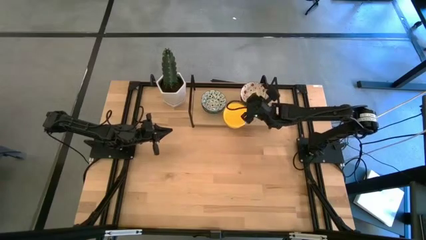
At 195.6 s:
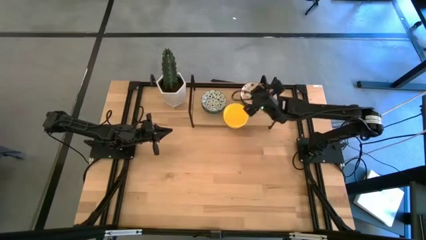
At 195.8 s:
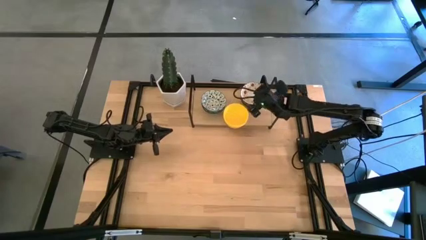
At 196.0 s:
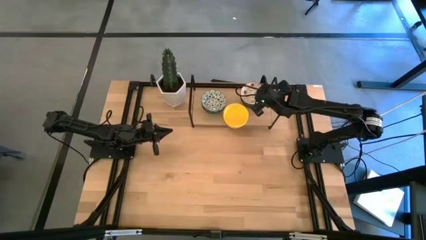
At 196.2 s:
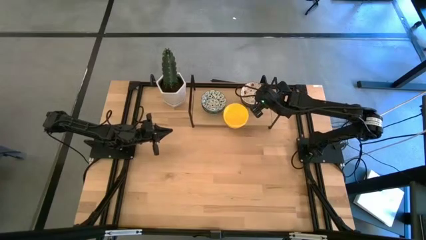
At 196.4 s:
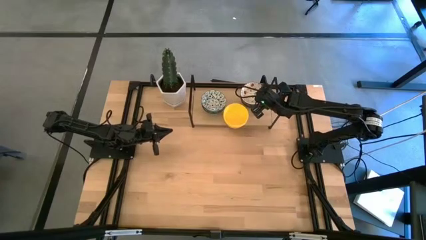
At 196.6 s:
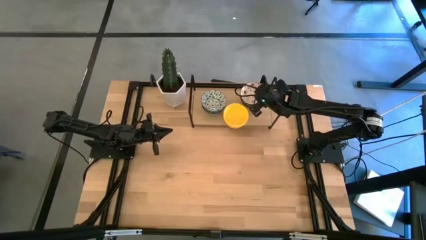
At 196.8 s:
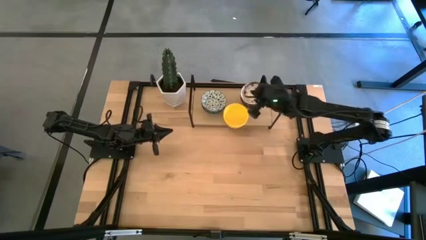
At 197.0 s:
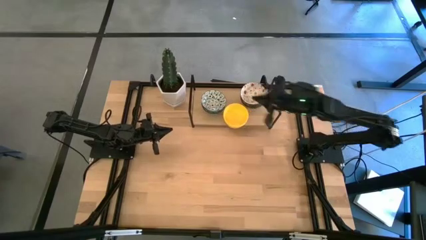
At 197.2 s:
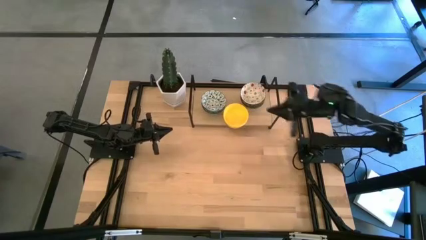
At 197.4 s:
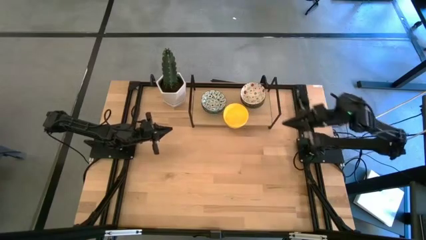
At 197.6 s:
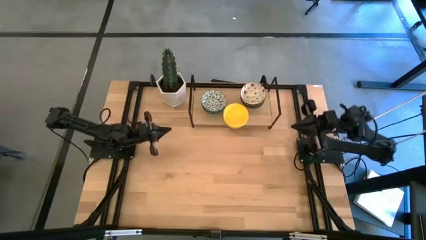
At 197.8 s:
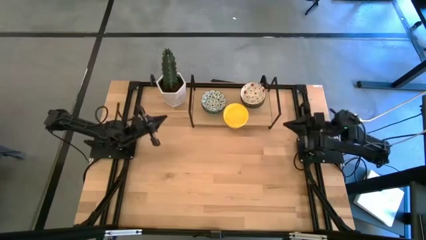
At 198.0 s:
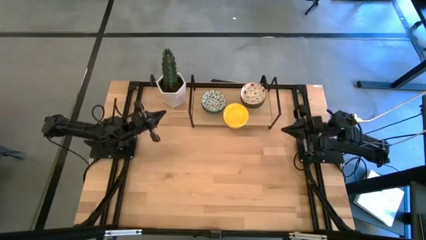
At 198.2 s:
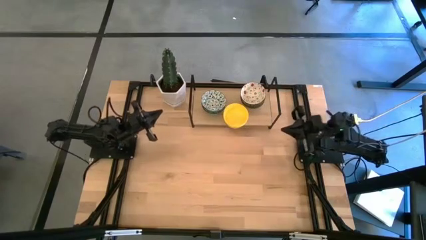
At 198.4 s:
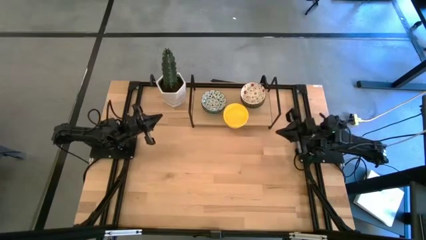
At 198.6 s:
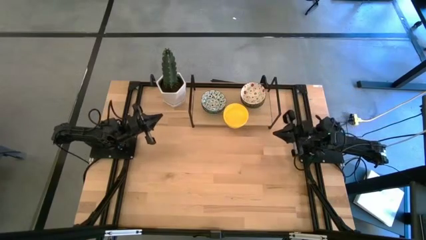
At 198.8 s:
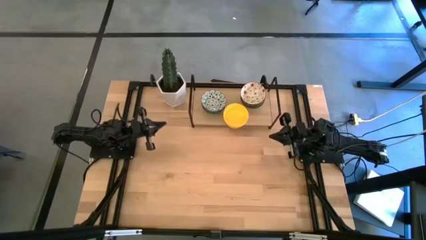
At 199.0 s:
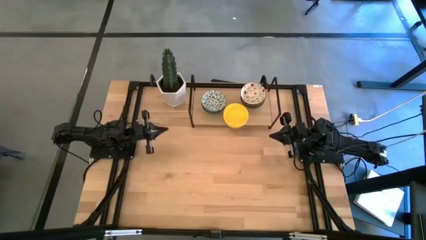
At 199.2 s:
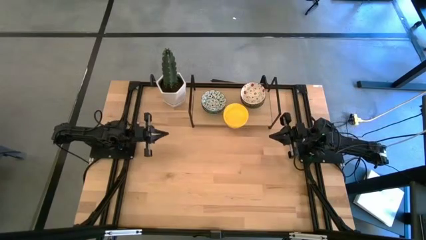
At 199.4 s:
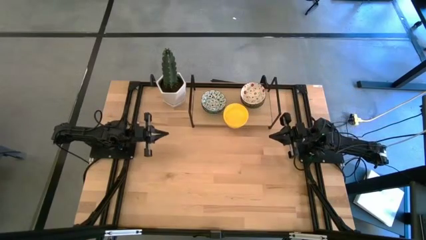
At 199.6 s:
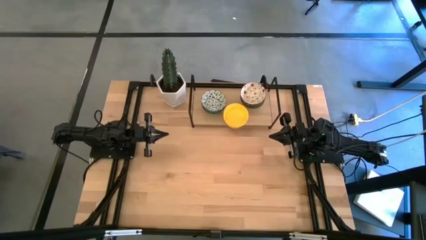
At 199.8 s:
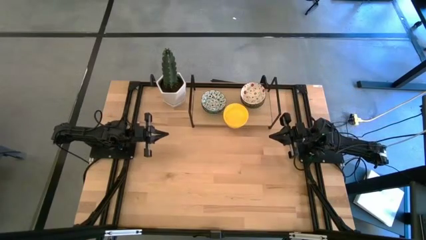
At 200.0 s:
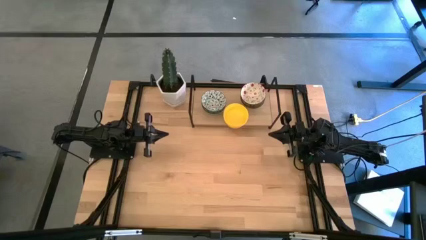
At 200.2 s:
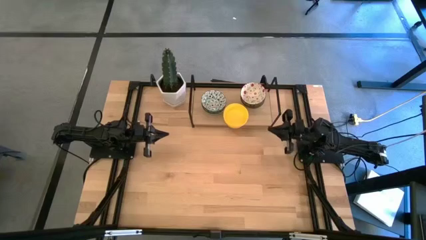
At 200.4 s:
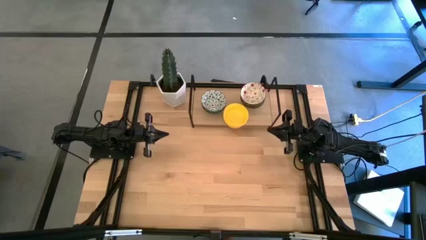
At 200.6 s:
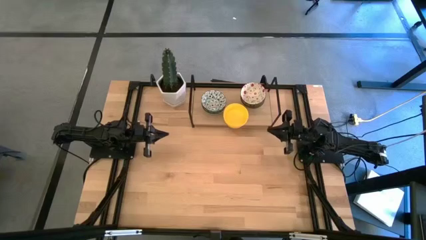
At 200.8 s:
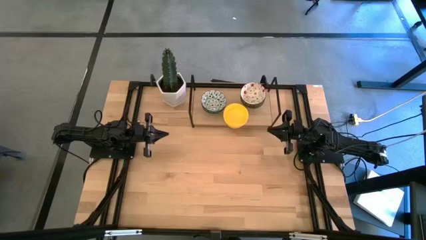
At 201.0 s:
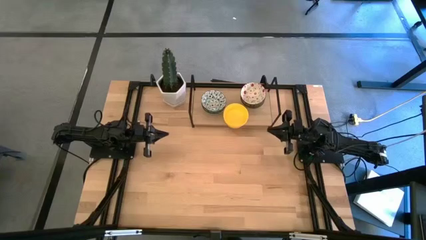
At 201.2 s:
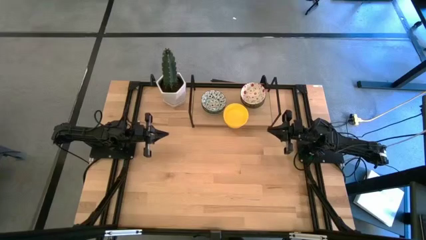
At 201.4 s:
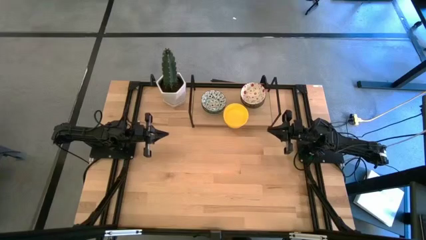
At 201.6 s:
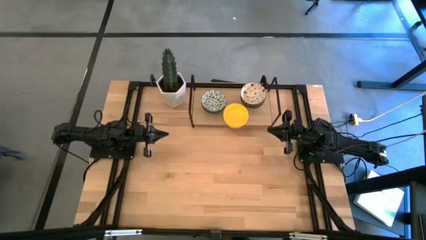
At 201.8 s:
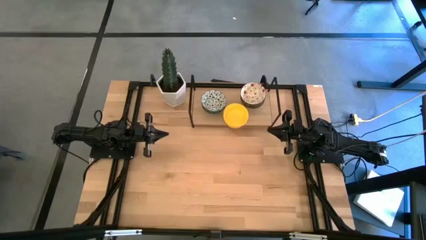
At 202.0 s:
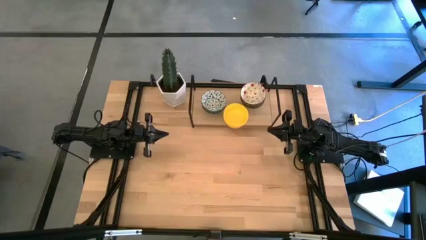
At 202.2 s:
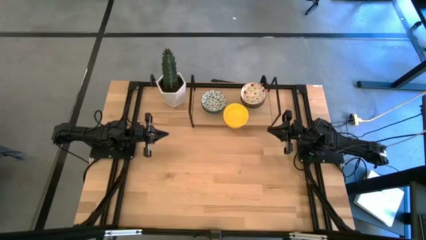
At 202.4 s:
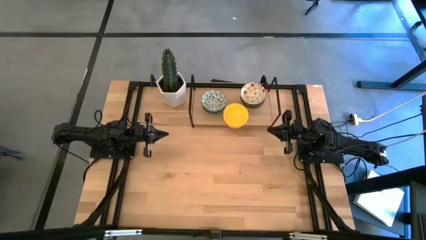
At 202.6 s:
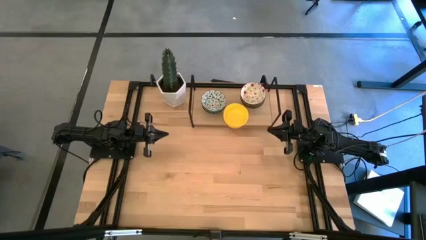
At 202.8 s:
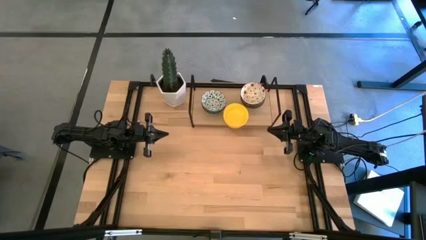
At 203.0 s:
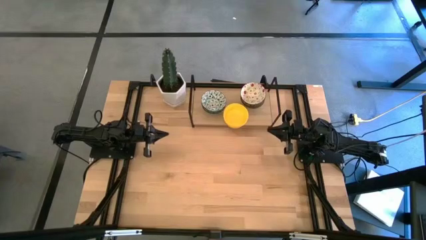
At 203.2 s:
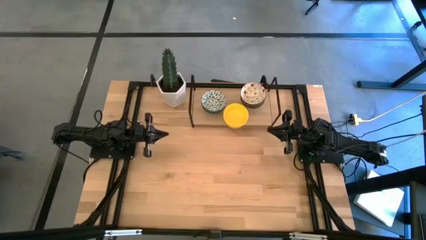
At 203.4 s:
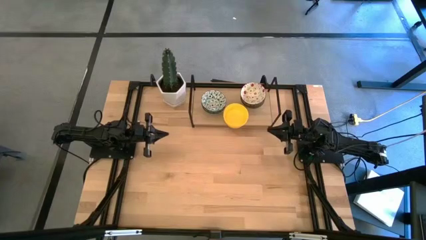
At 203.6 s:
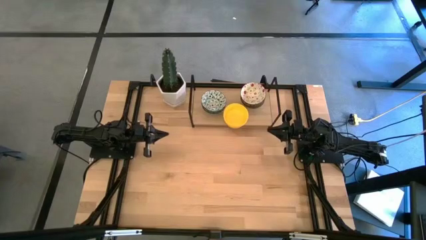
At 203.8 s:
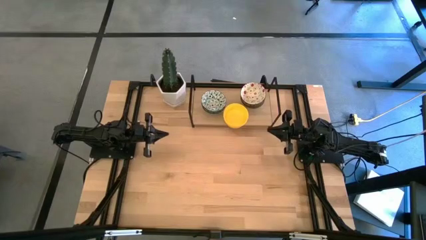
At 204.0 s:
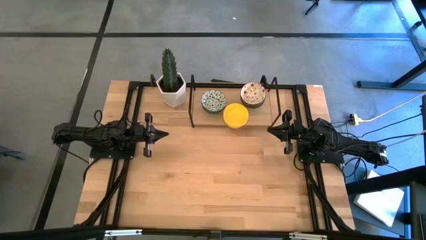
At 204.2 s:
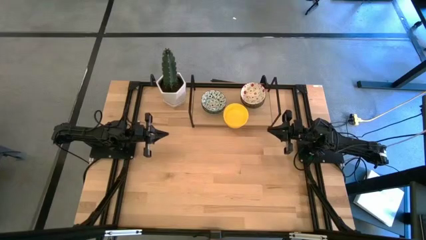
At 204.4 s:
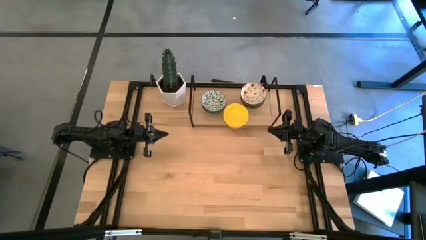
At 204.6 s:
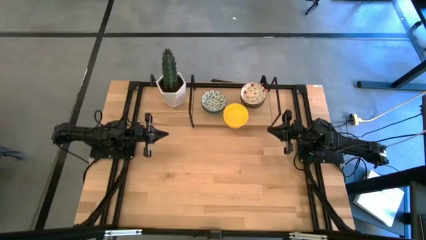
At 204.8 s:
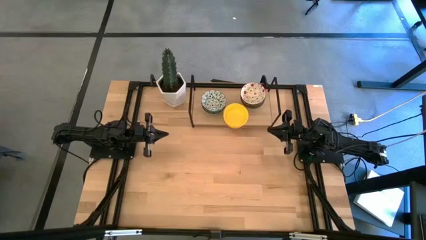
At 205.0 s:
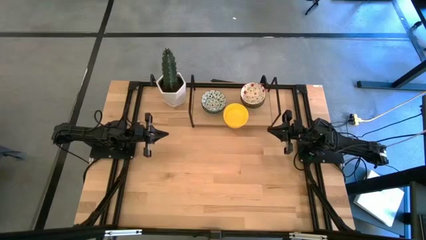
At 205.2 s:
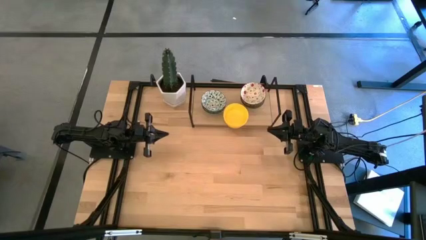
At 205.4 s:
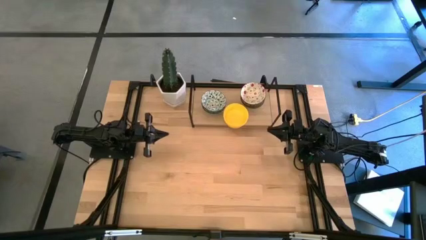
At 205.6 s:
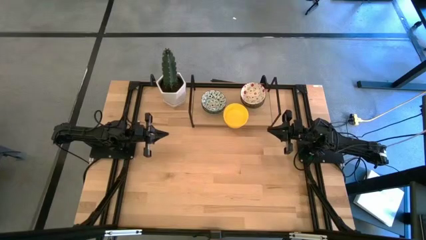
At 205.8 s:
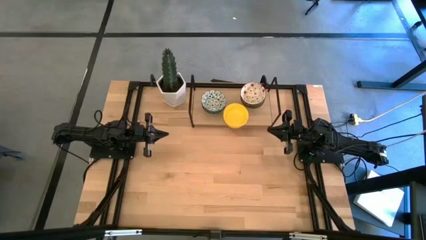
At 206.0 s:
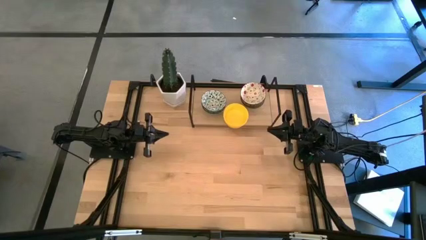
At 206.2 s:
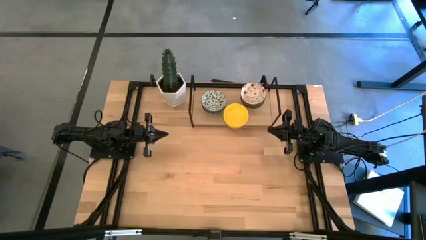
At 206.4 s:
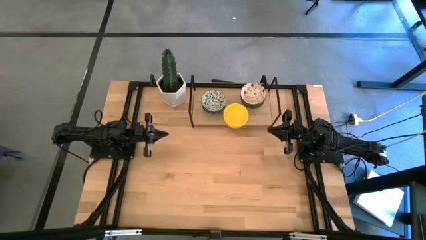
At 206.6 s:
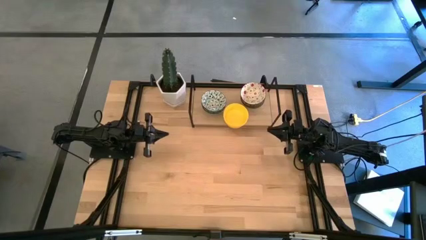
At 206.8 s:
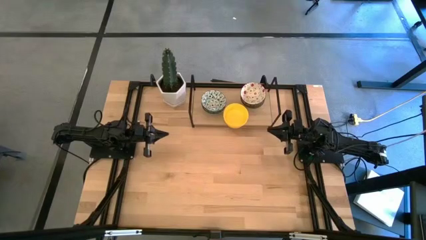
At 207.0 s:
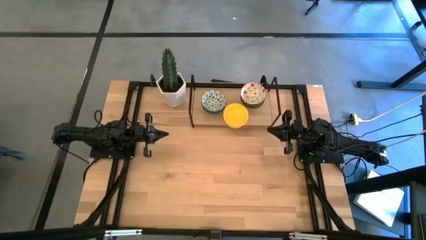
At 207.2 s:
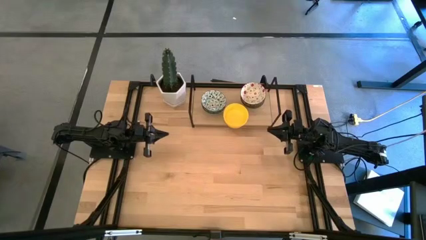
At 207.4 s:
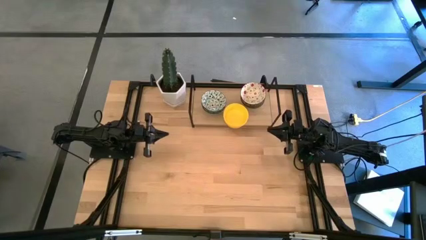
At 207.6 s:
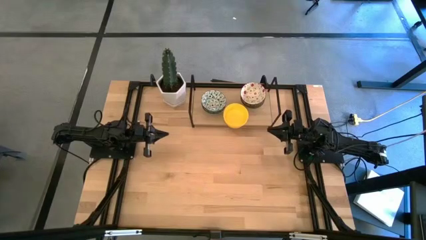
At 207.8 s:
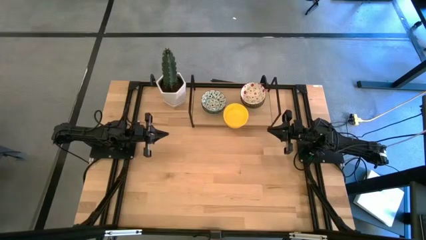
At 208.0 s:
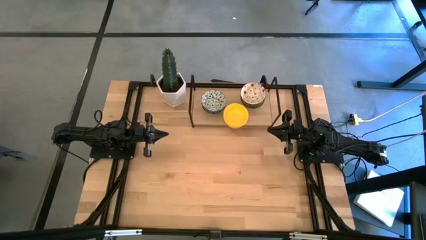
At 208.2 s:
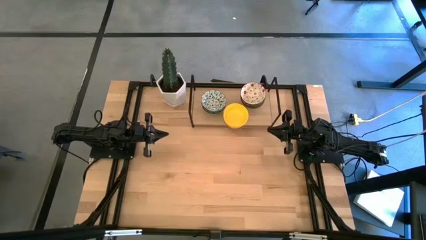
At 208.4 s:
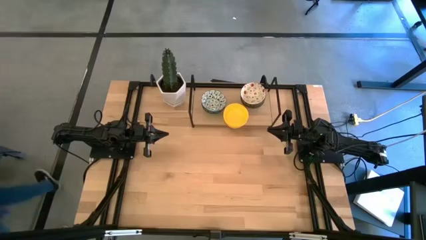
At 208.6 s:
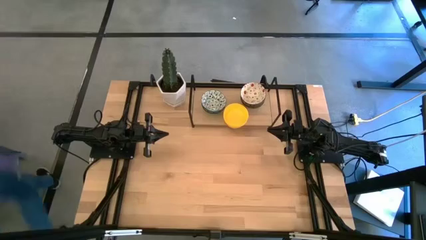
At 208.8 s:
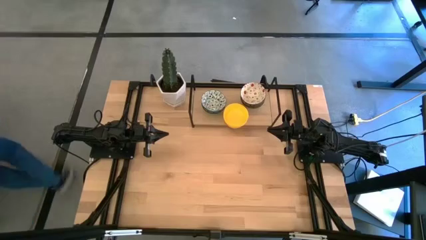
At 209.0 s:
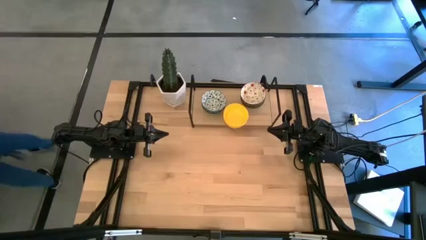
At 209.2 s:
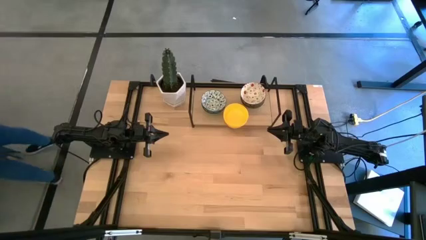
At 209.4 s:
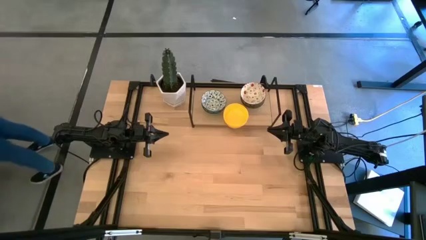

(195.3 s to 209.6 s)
Task: Pick & Place Mini bowls
Return to Home Position

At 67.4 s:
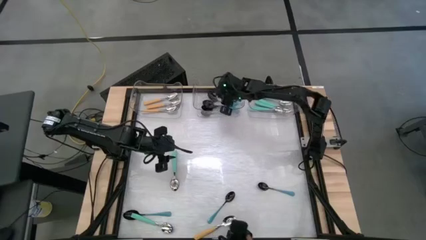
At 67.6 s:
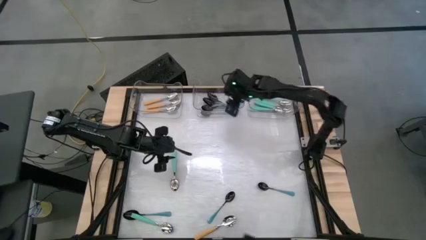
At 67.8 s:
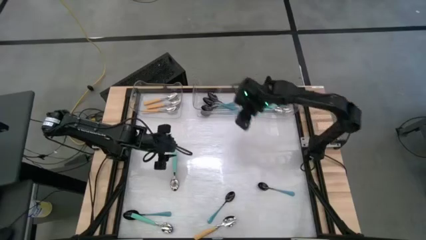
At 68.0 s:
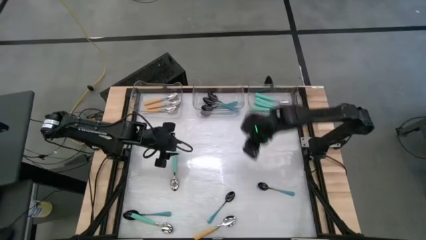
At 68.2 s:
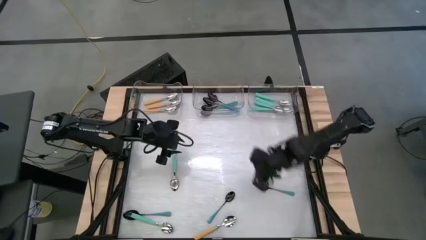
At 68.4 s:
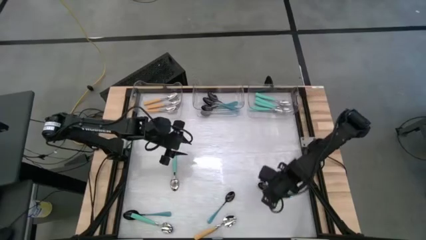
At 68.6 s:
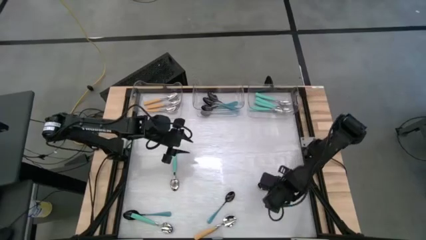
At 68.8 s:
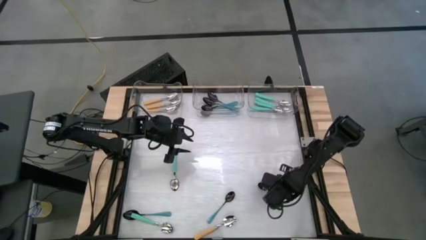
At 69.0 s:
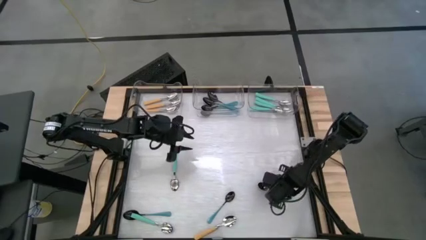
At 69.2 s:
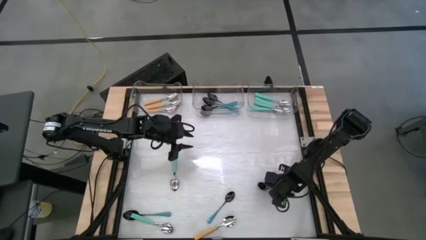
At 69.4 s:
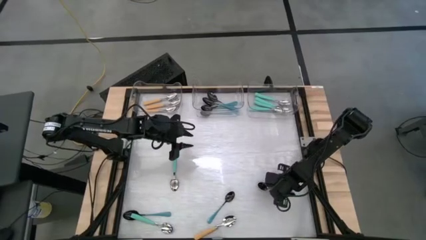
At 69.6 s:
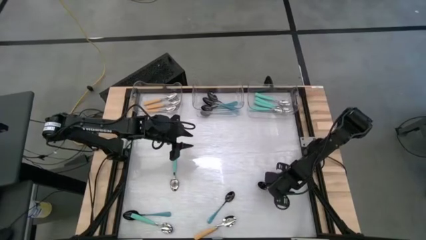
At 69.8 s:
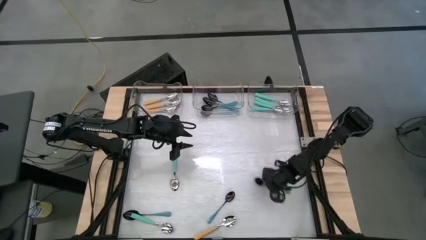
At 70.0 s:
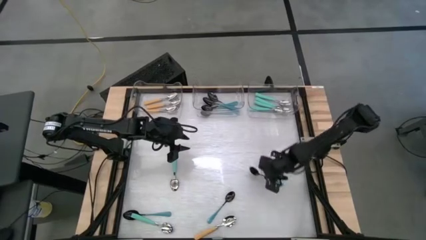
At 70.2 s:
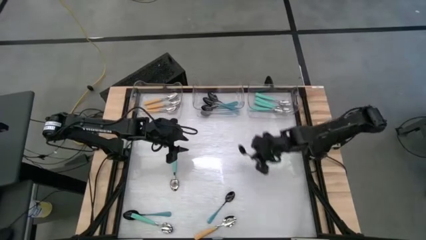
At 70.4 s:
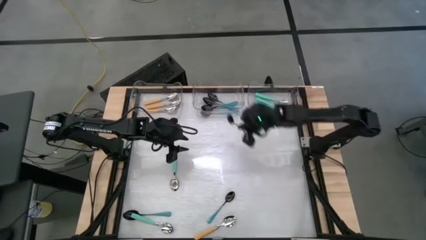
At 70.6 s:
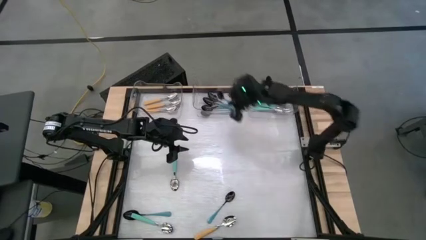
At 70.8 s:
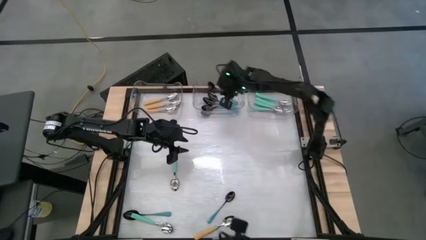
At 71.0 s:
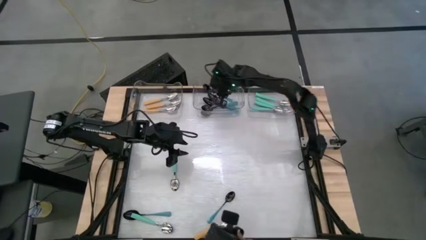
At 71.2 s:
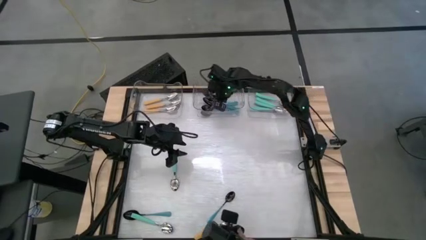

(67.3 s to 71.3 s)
Task: Sort silverware by color (type)
Put the blue spoon into the middle transparent bin
